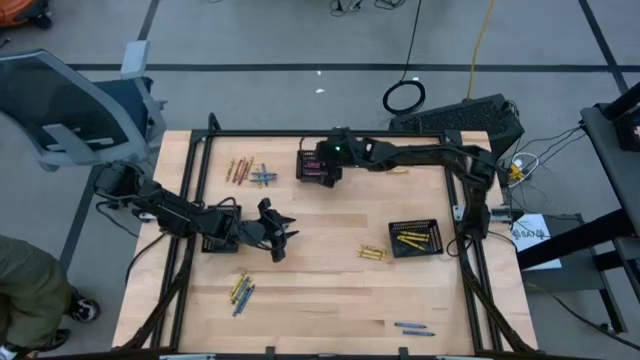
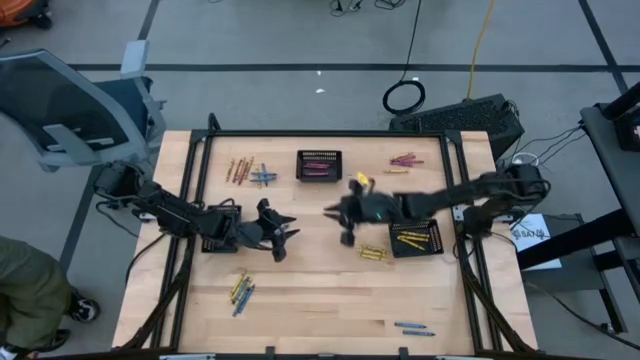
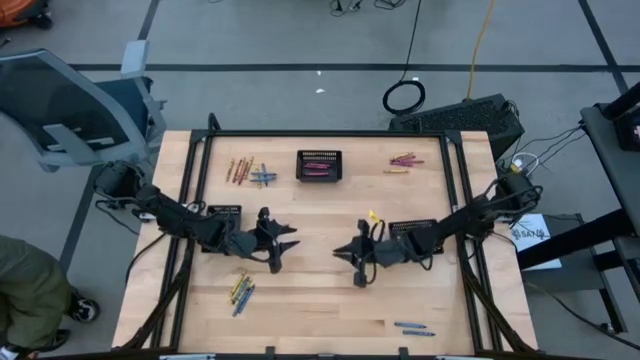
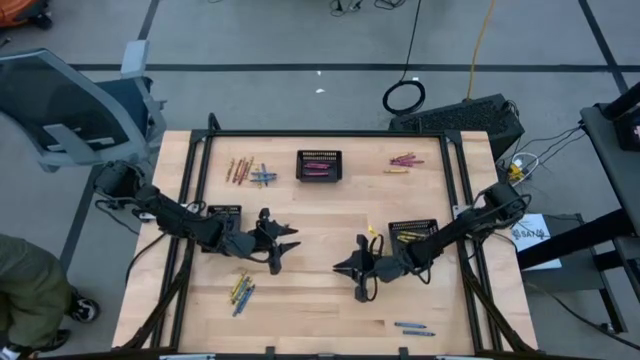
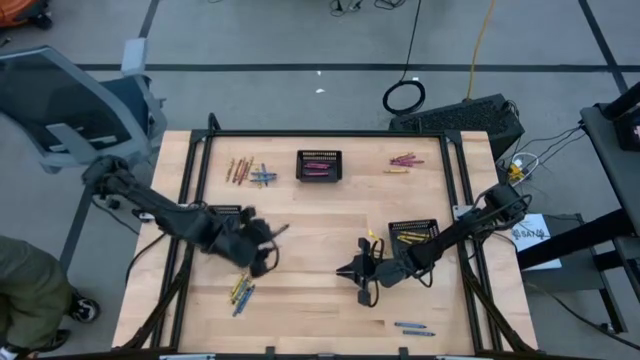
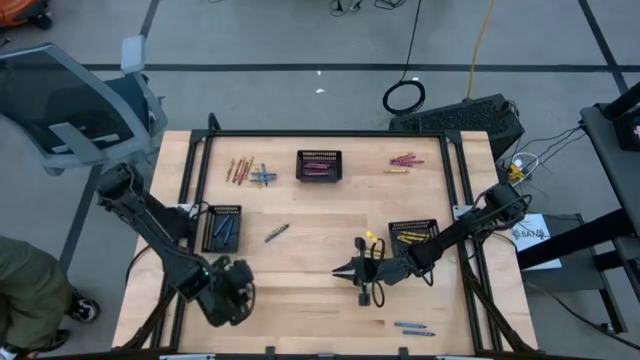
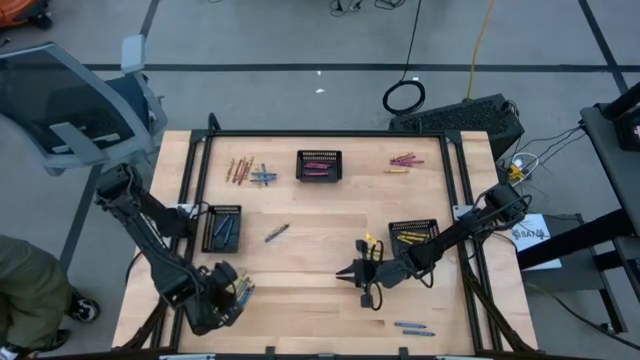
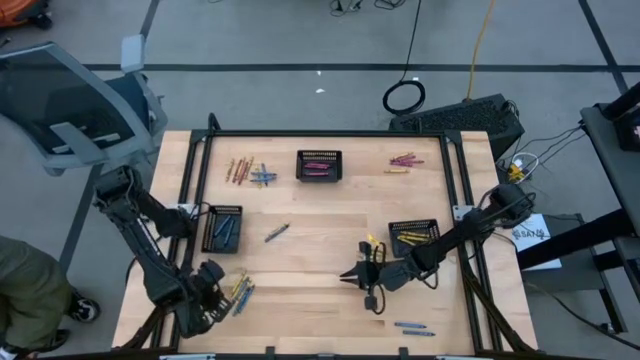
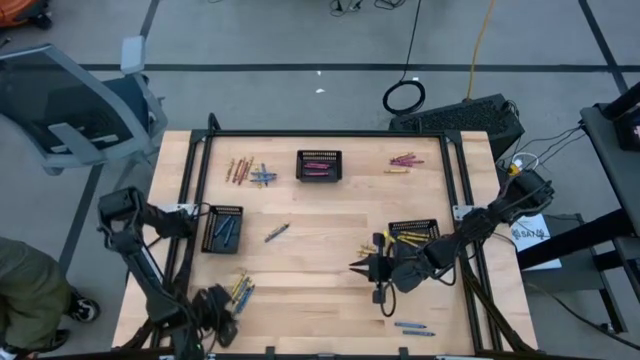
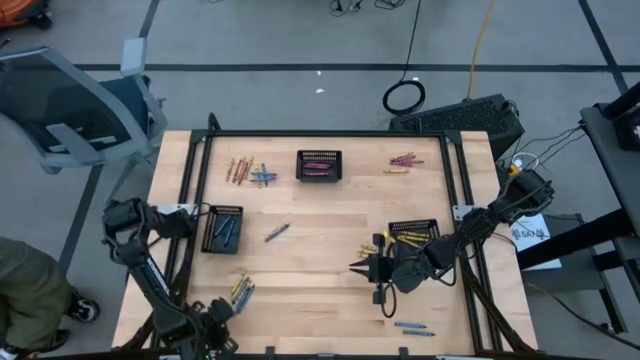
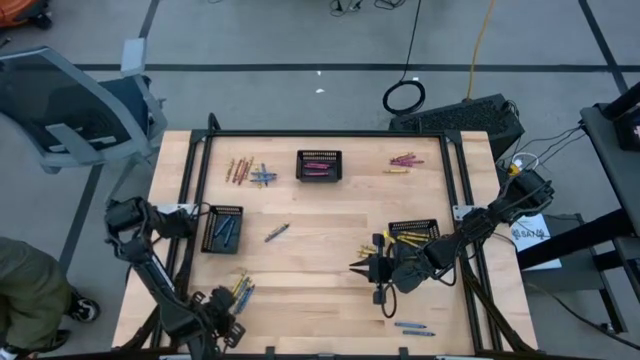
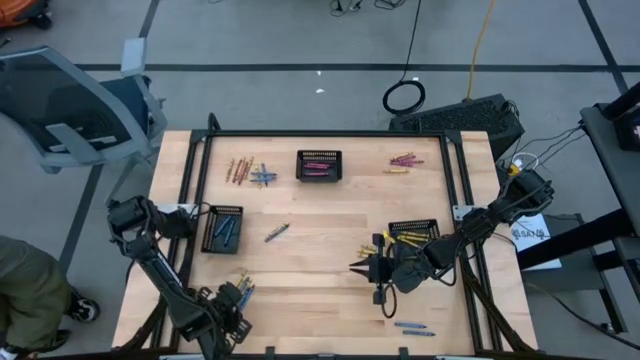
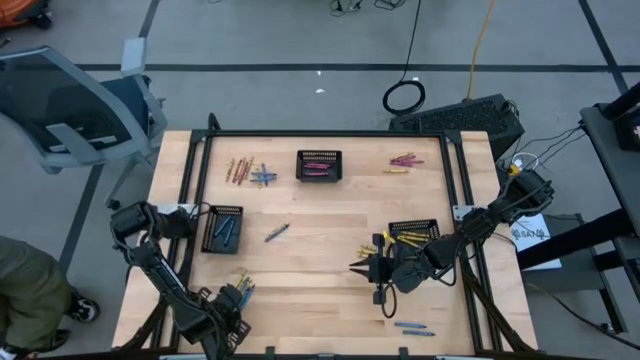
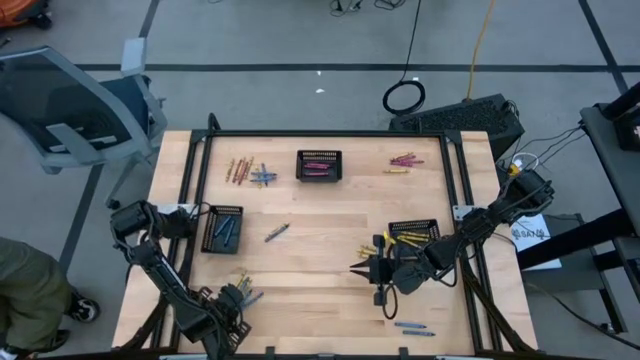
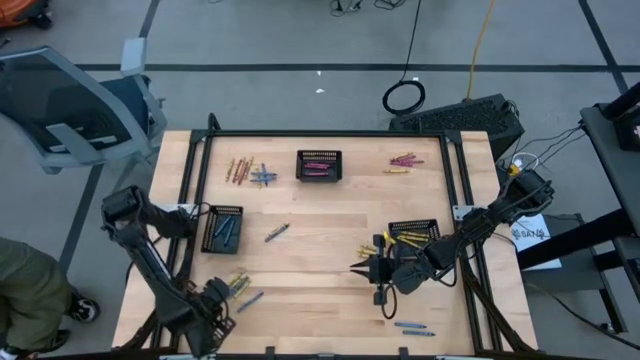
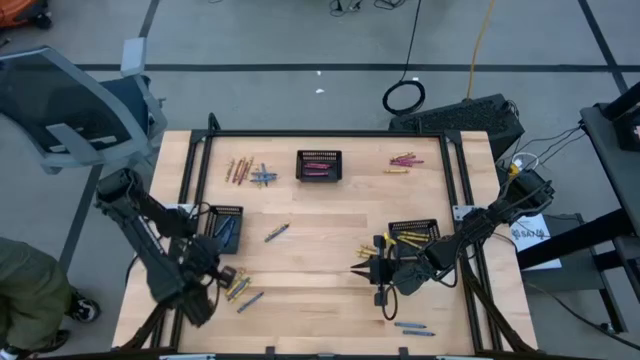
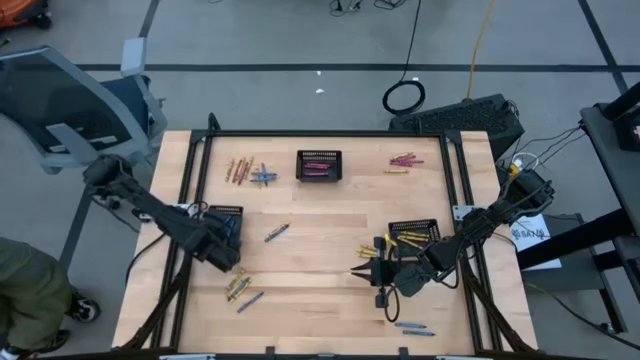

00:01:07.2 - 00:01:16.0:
Task: Sort crayons
Put the blue crayon into the bottom left black bin

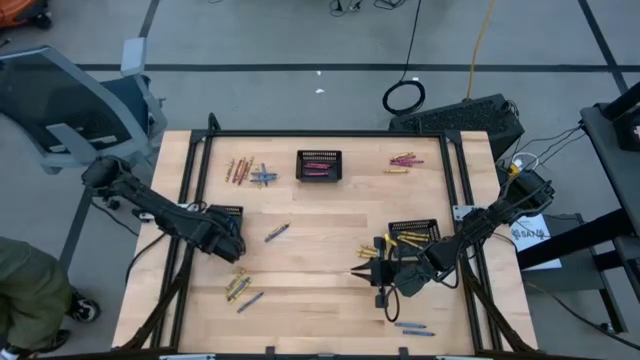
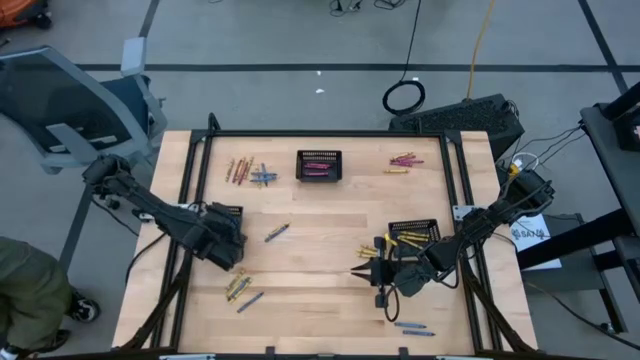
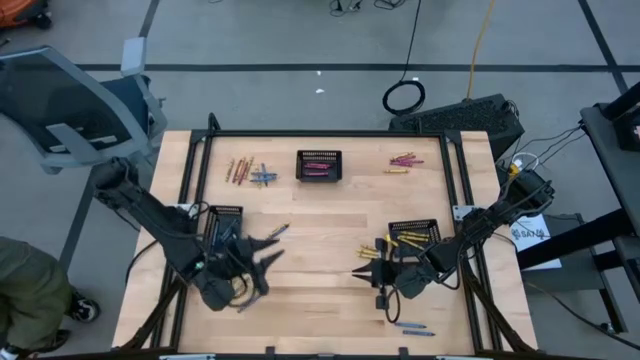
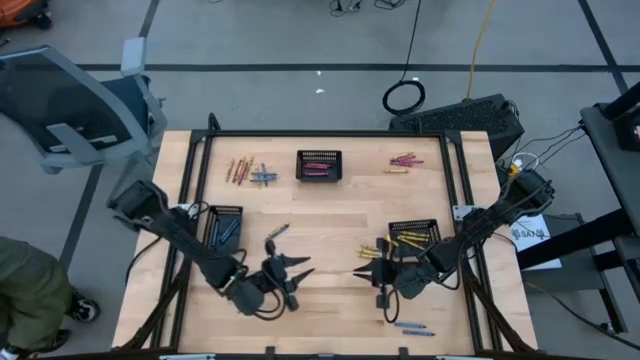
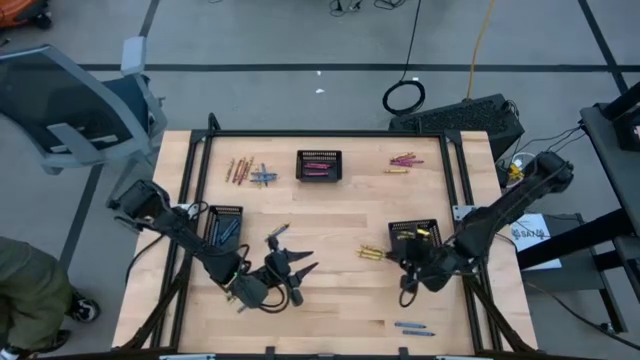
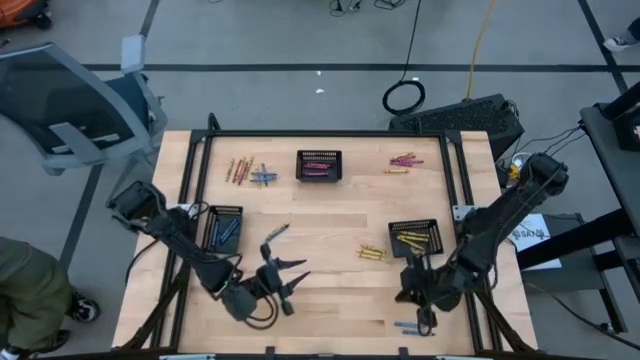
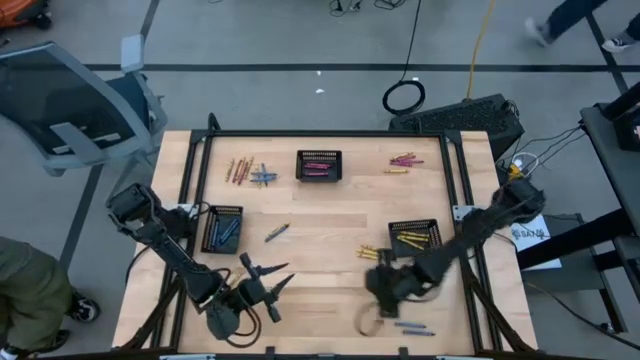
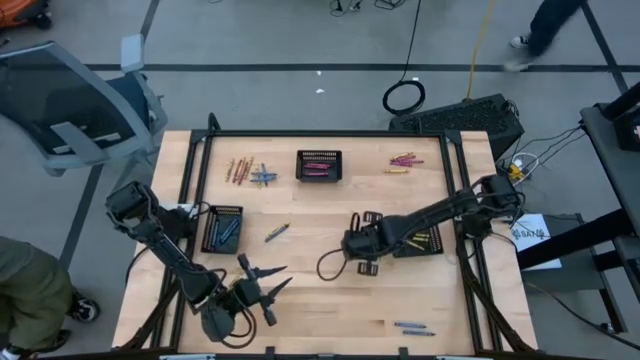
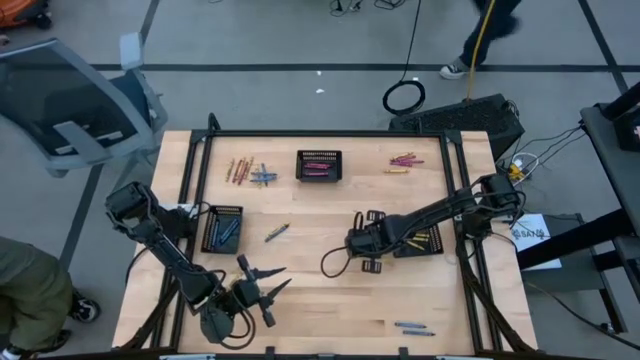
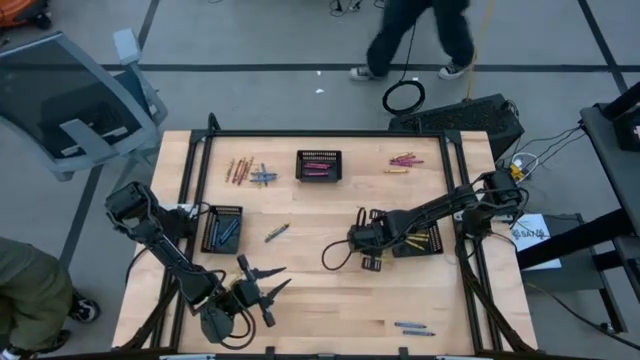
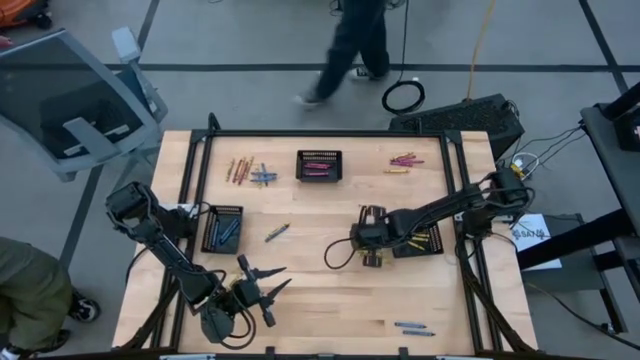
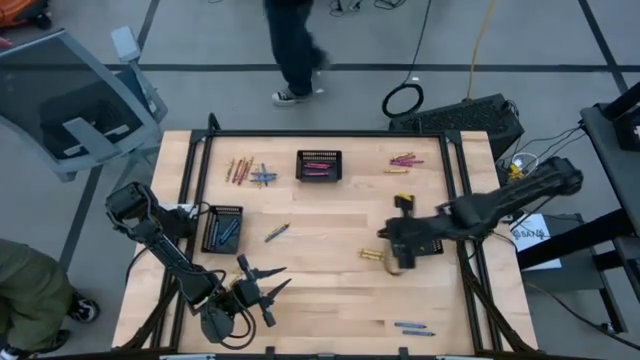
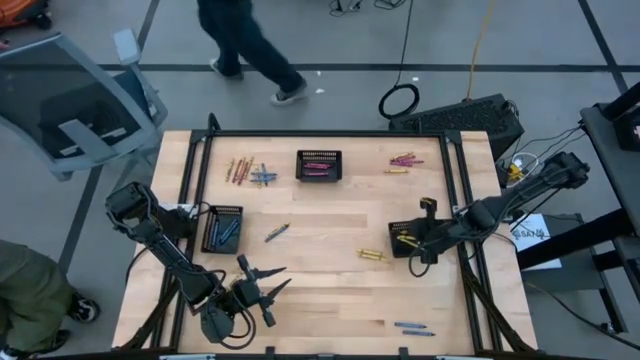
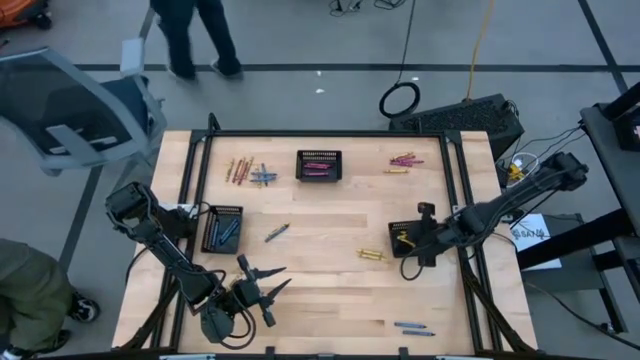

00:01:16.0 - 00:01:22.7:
Put the yellow crayon into the bottom right black bin

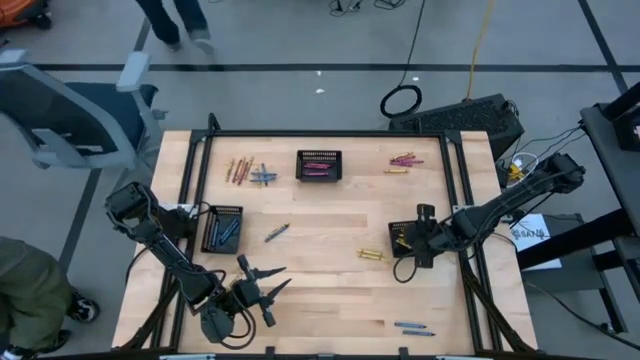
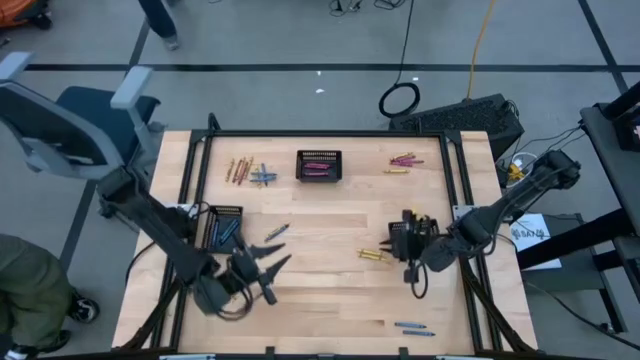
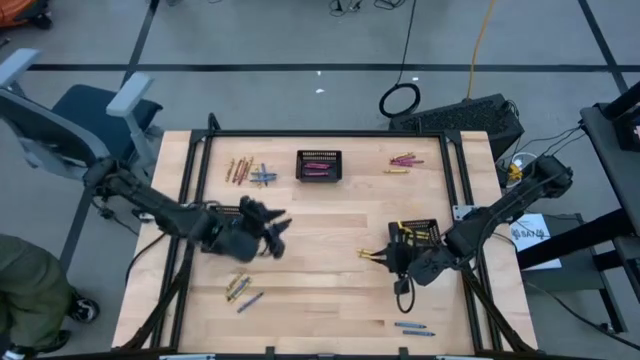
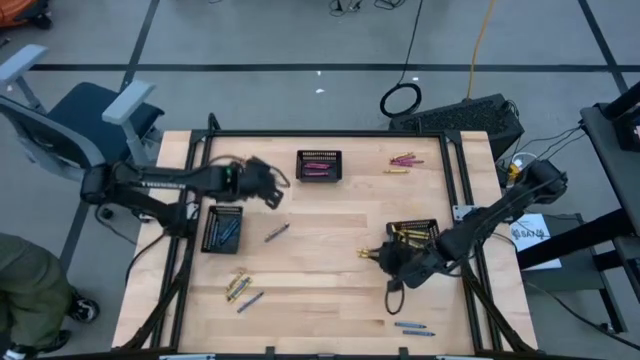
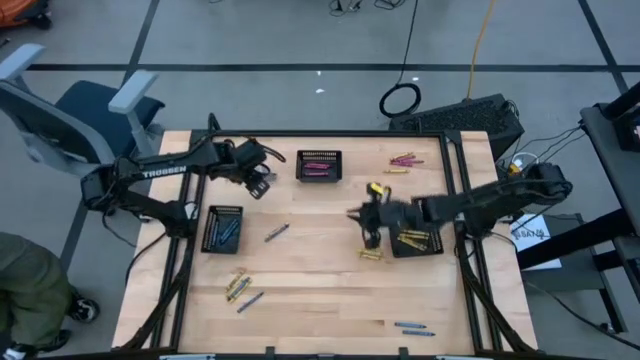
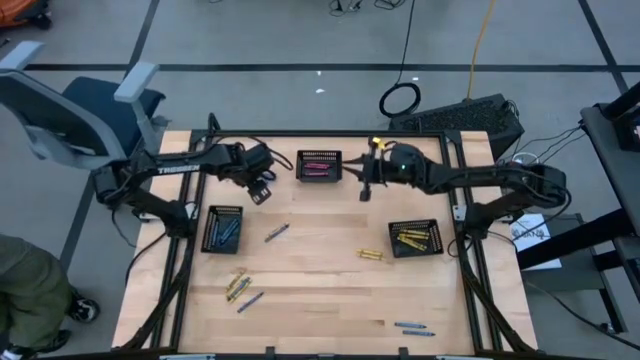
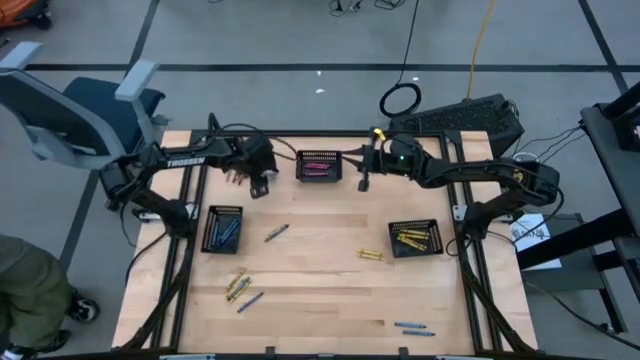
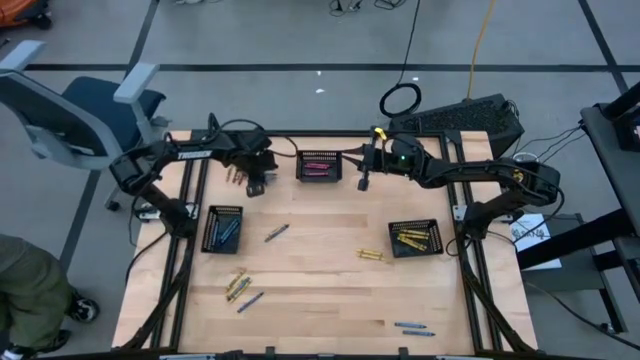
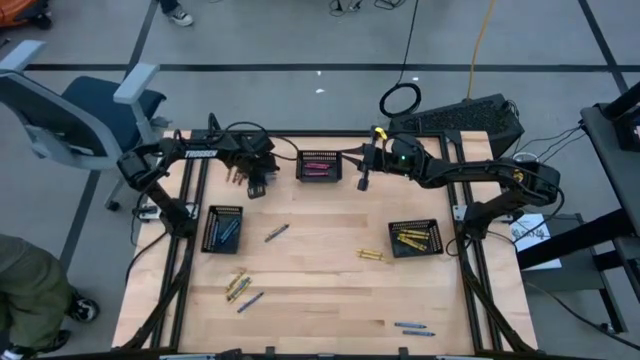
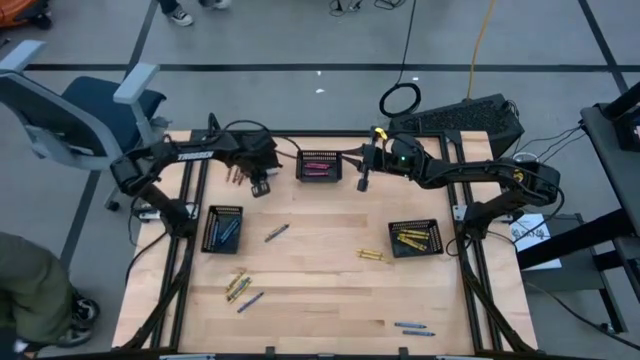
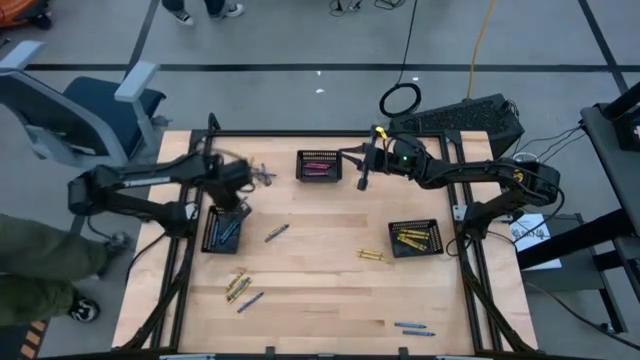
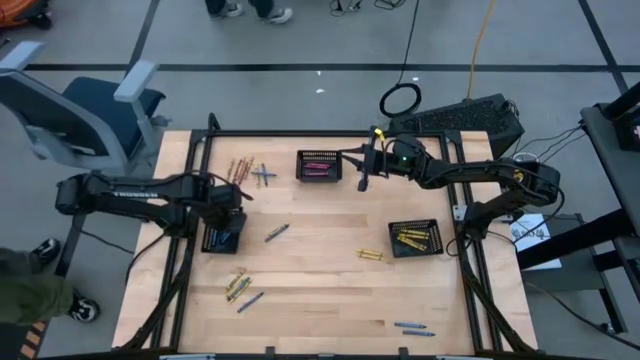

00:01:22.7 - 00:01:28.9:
Put the blue crayon into the bottom left black bin
